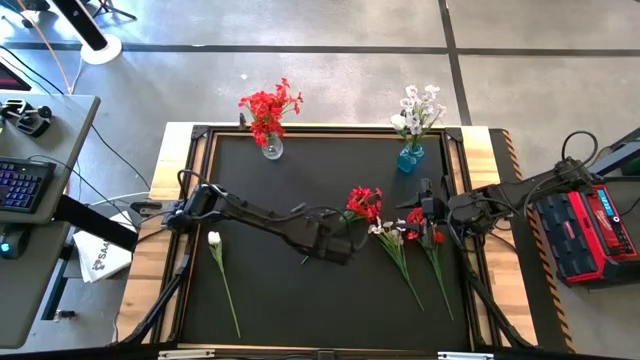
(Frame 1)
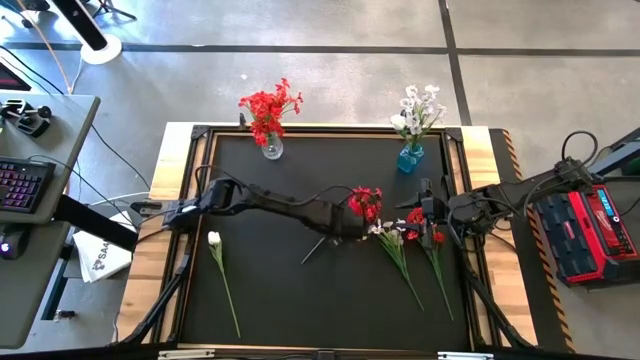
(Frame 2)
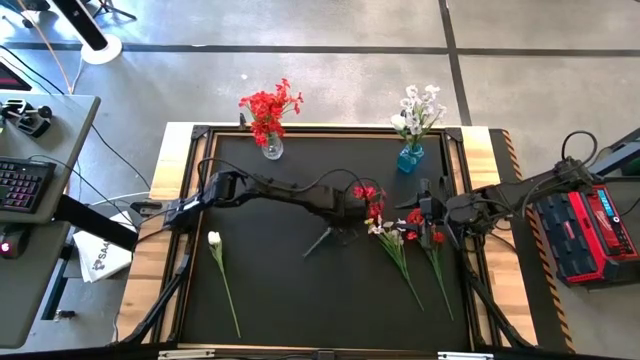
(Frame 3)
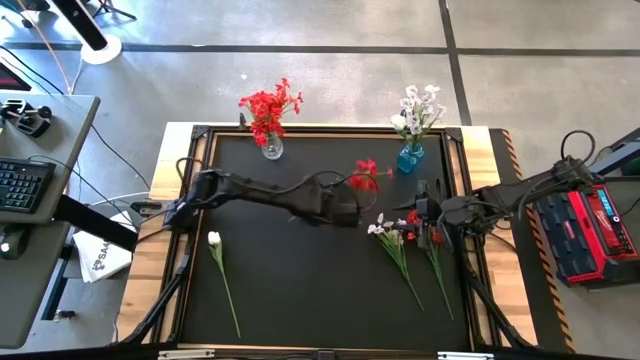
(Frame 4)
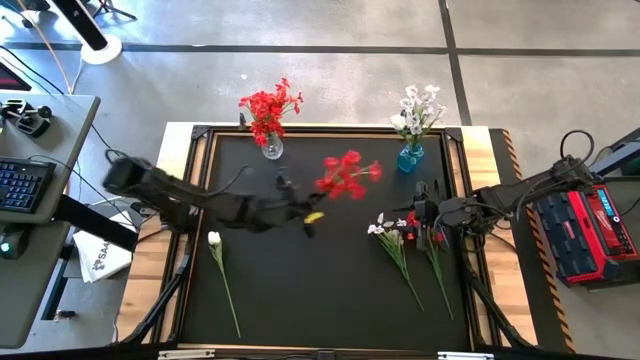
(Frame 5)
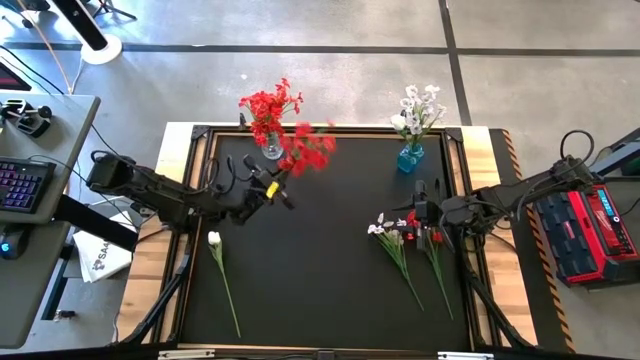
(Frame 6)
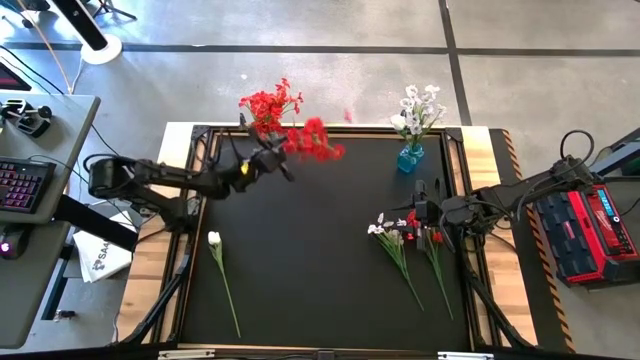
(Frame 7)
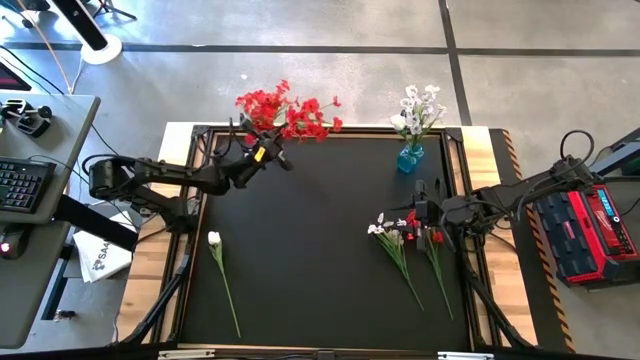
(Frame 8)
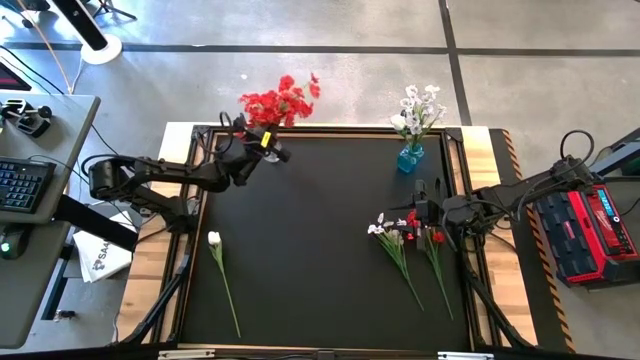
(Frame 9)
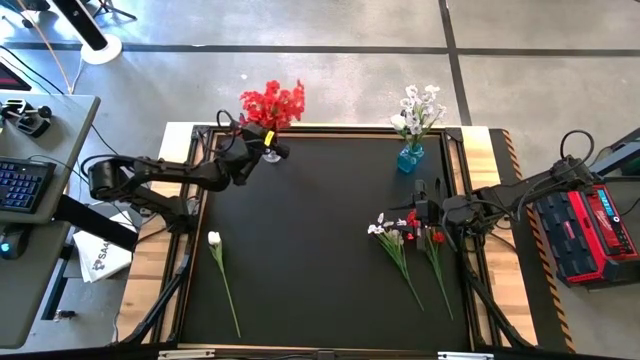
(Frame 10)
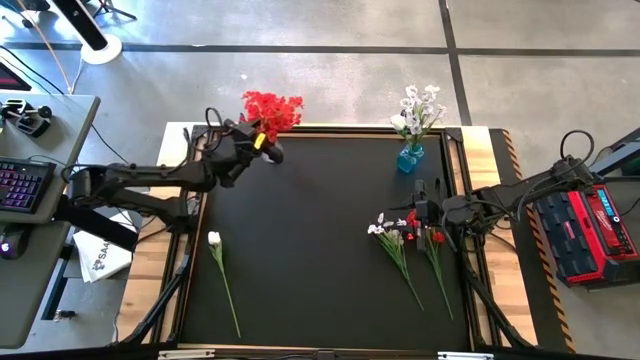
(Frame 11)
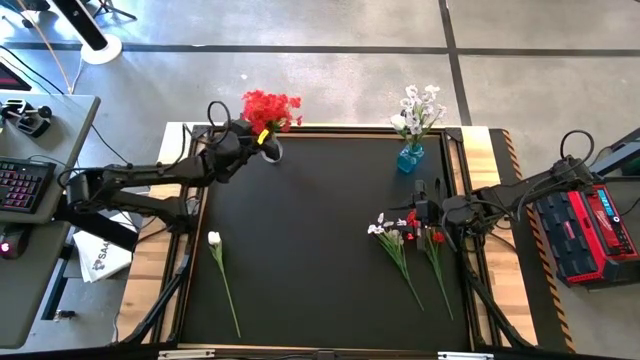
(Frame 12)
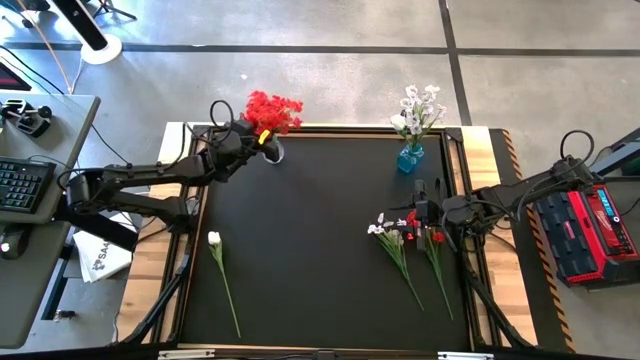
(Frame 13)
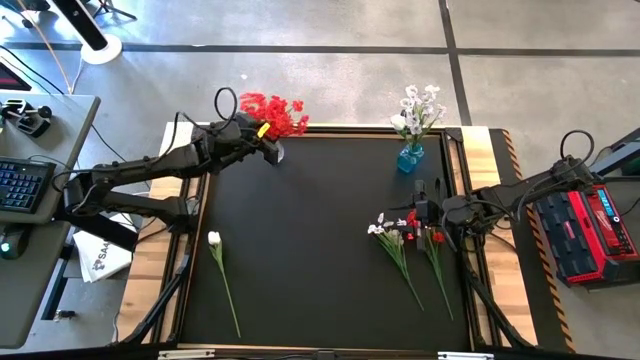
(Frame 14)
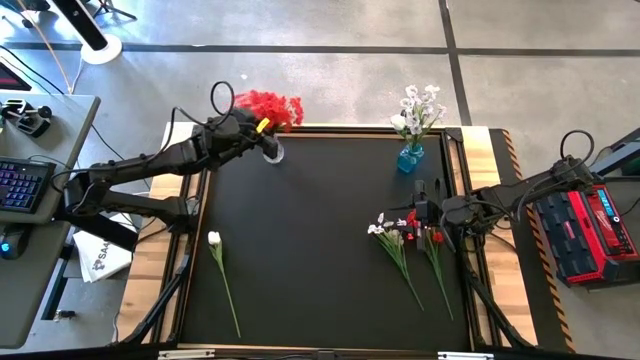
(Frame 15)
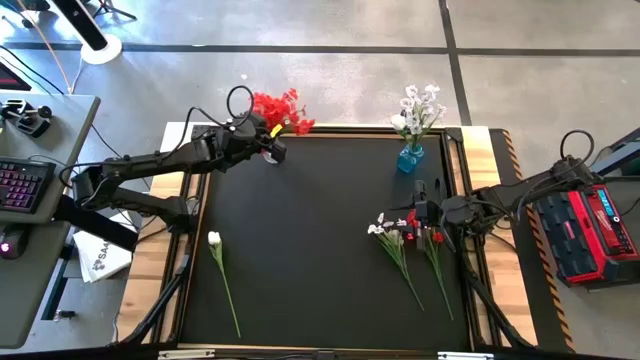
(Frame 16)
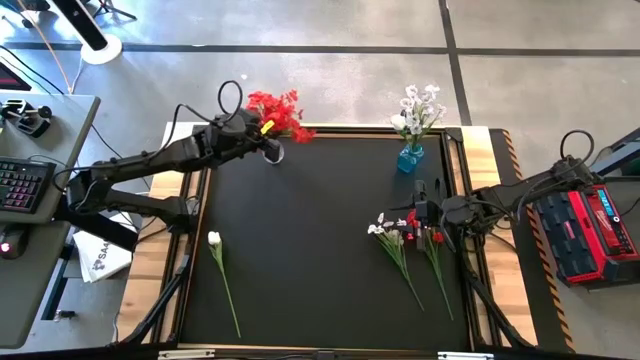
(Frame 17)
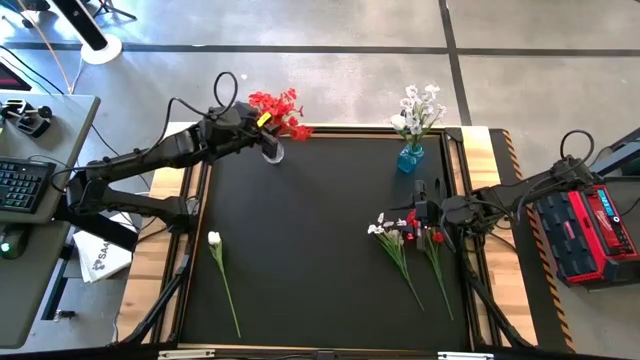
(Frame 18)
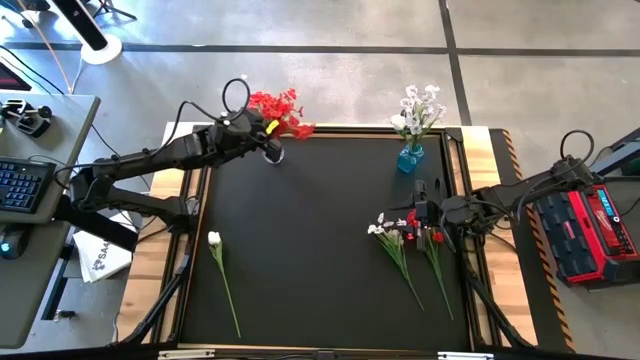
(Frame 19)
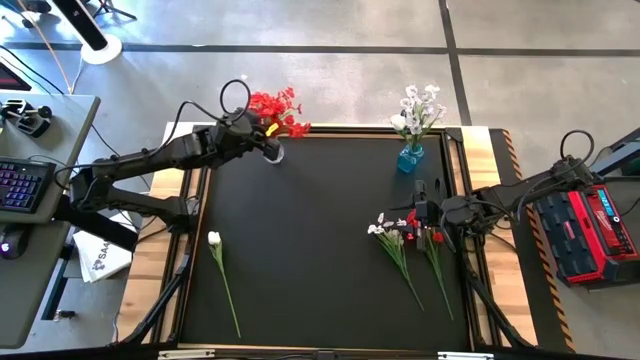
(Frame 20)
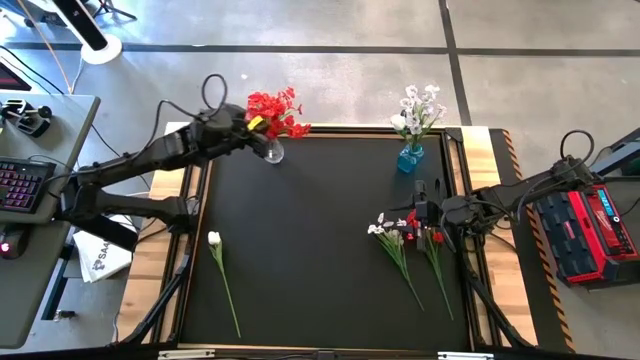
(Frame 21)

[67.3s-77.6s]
Task: Sort flowers into vase by color
Put the left red flowers into the transparent vase

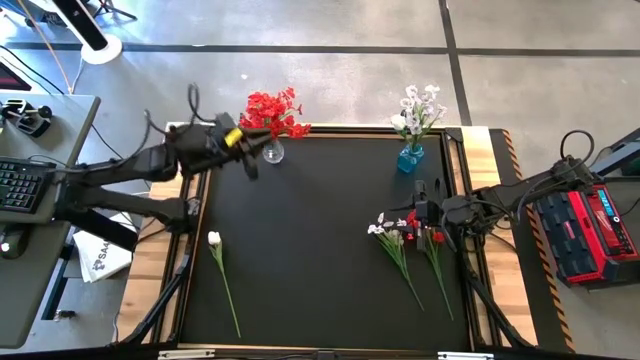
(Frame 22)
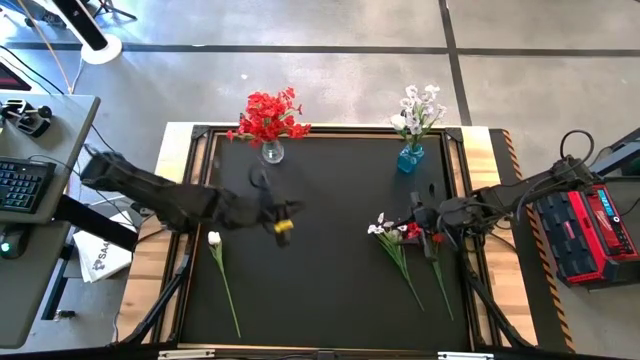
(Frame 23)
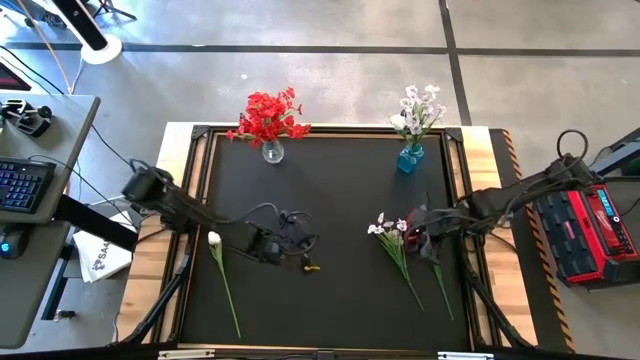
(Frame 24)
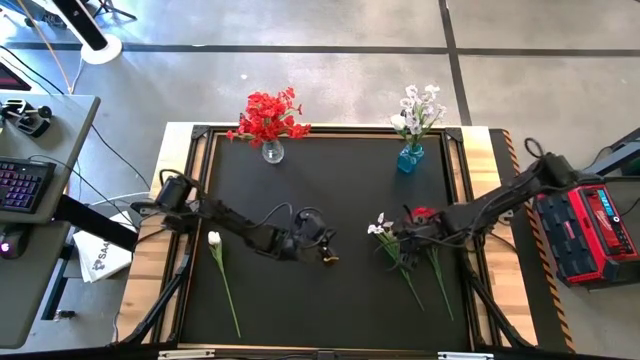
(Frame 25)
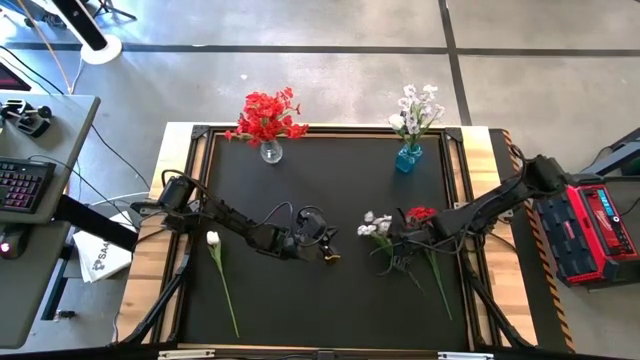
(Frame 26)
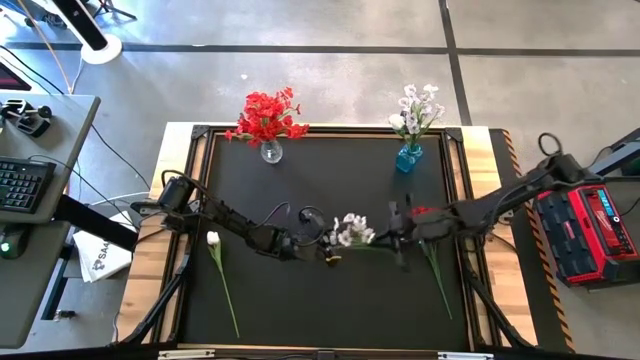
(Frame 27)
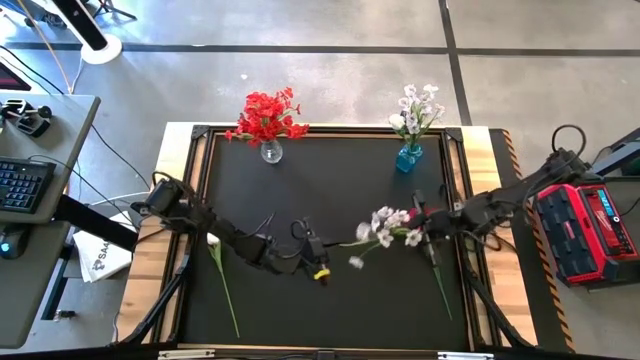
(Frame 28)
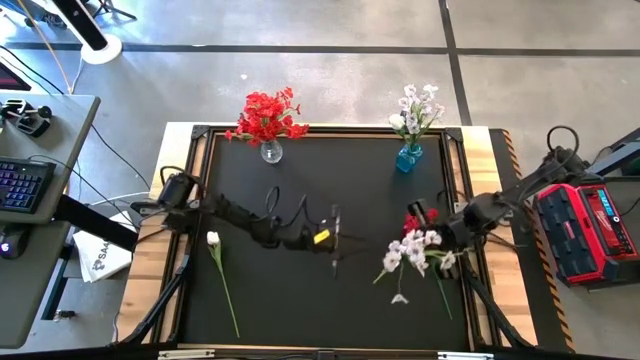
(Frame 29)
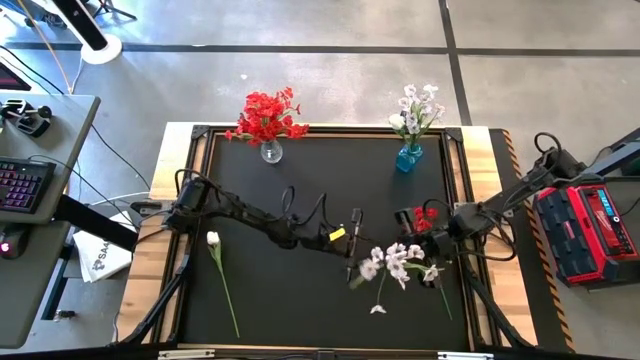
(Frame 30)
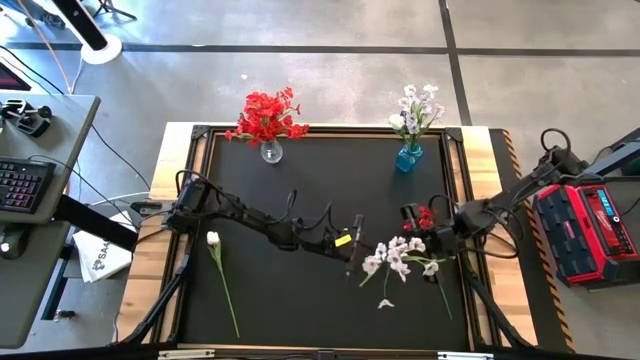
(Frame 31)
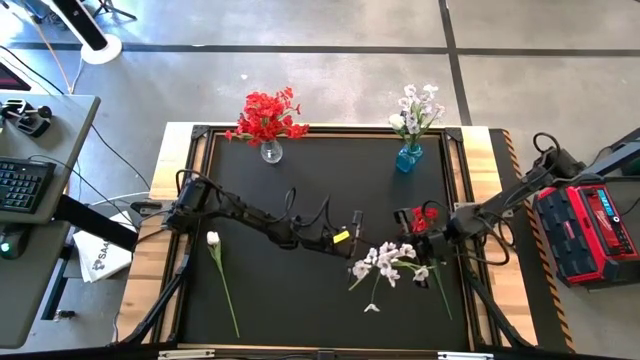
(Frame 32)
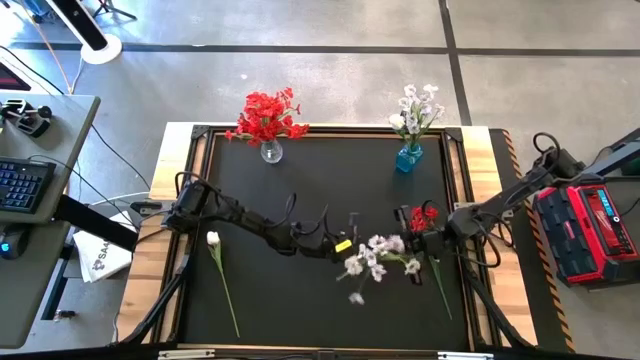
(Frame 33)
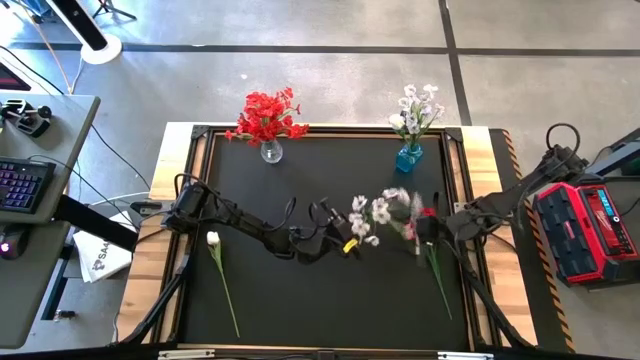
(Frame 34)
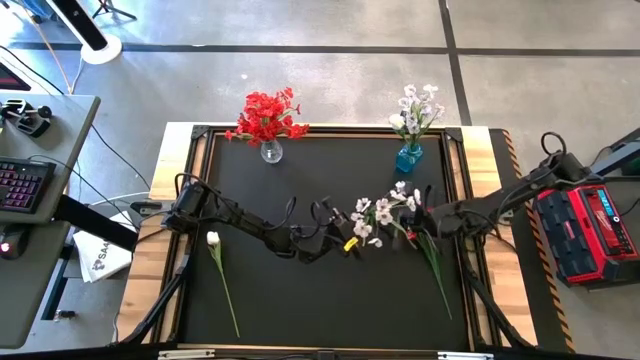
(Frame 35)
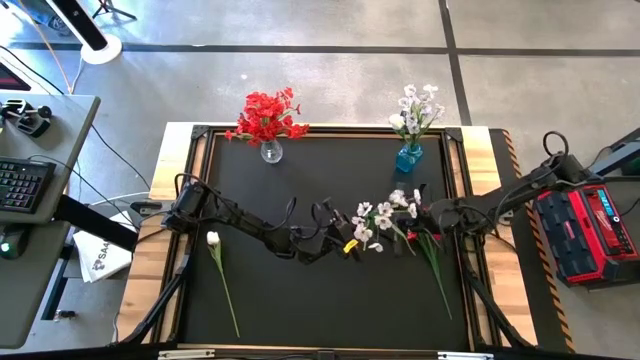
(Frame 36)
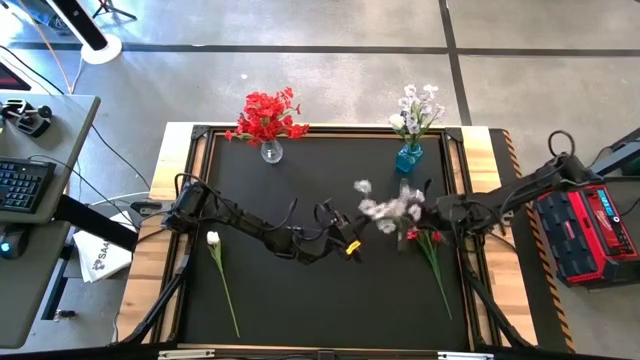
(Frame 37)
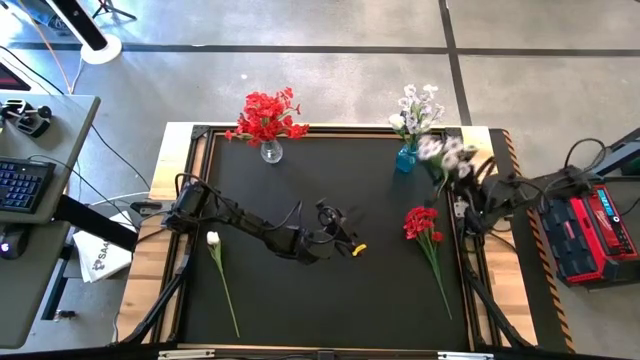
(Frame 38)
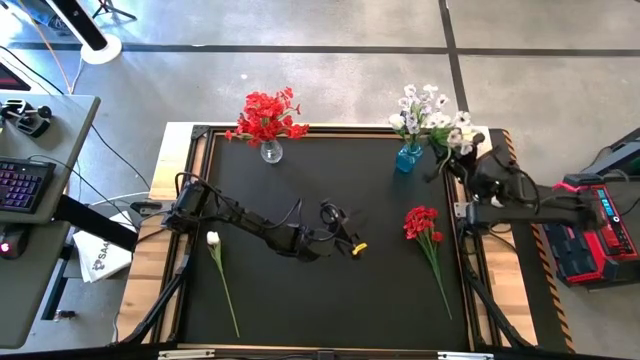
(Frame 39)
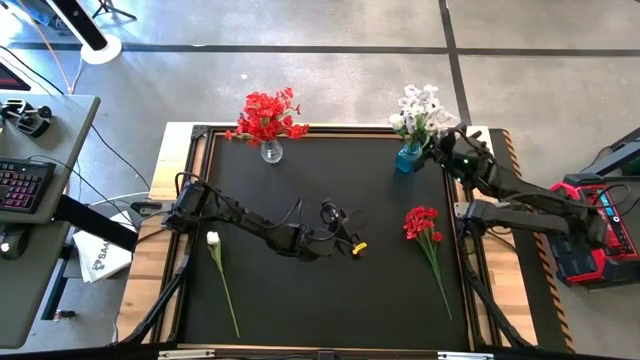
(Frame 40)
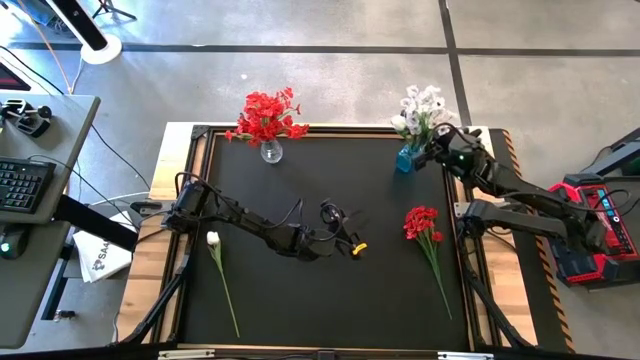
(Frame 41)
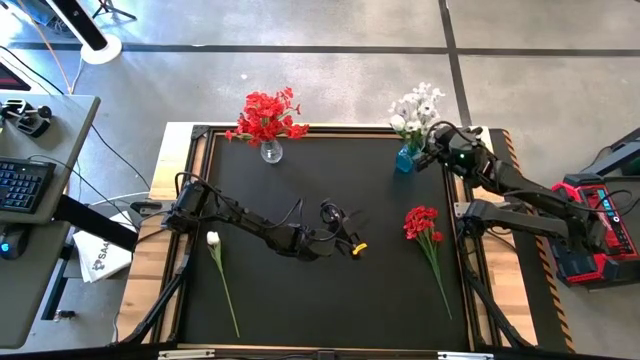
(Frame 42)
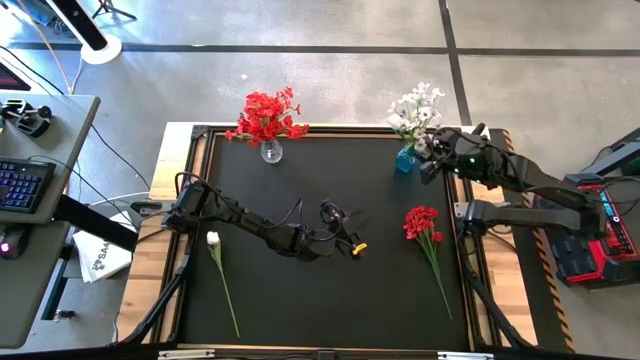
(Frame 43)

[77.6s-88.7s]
Put the white flowers into the blue vase

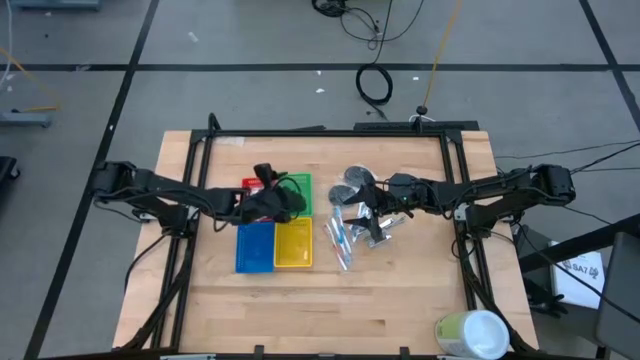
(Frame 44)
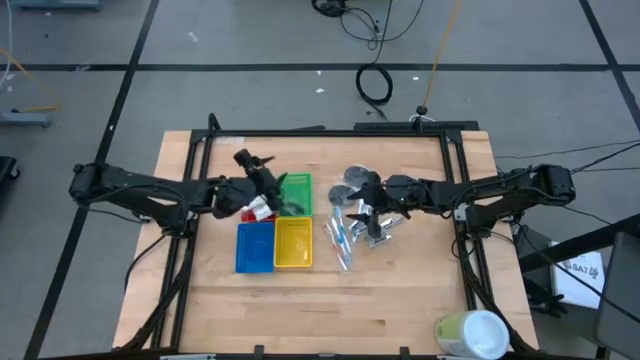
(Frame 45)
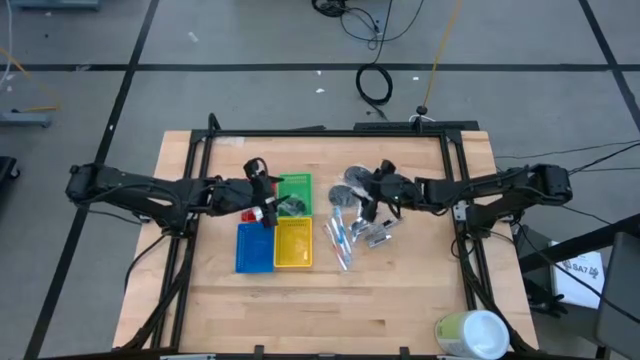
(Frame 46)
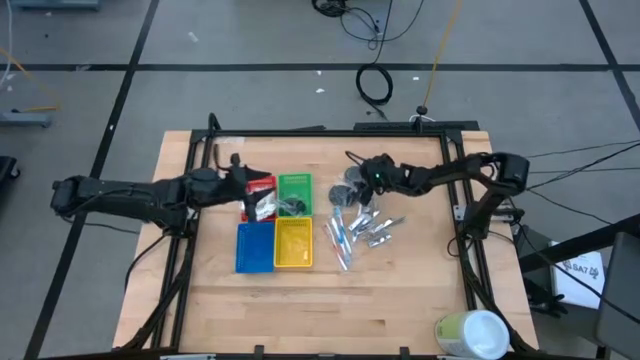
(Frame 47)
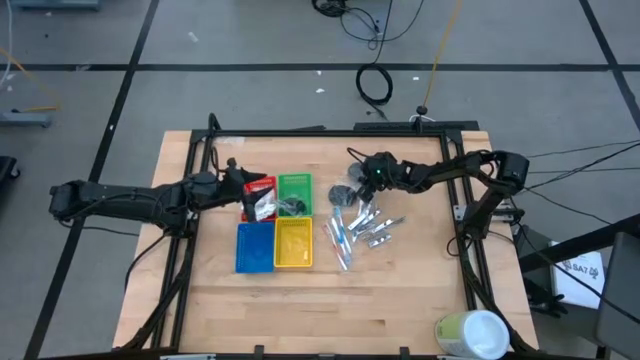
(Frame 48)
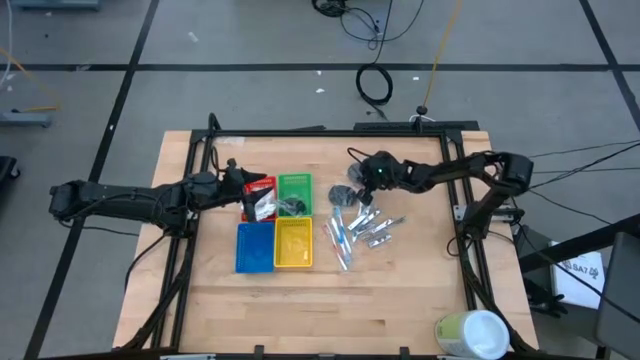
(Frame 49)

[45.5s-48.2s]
Task: Pick & Place Travel size toiletries
Put the black hairbrush into the green bin
